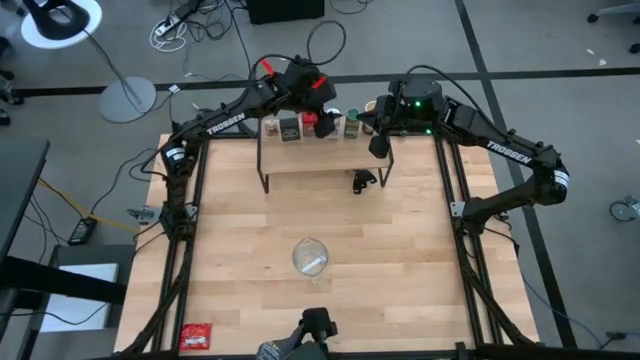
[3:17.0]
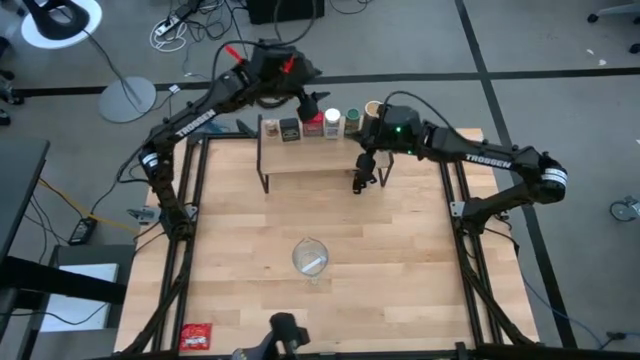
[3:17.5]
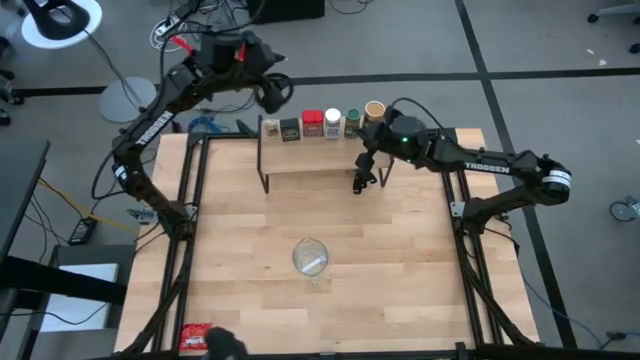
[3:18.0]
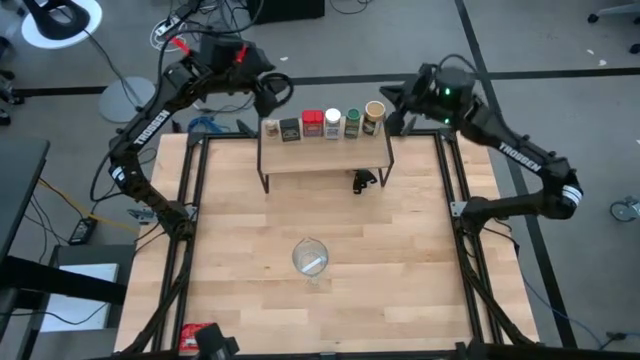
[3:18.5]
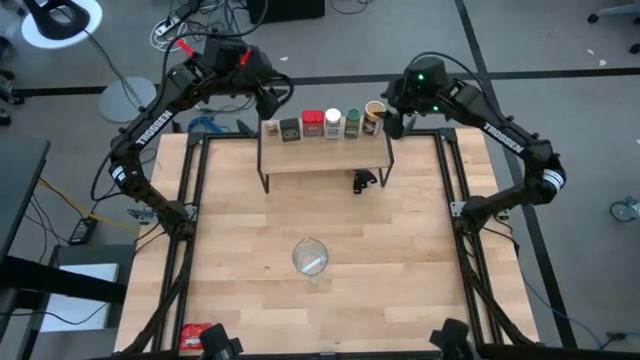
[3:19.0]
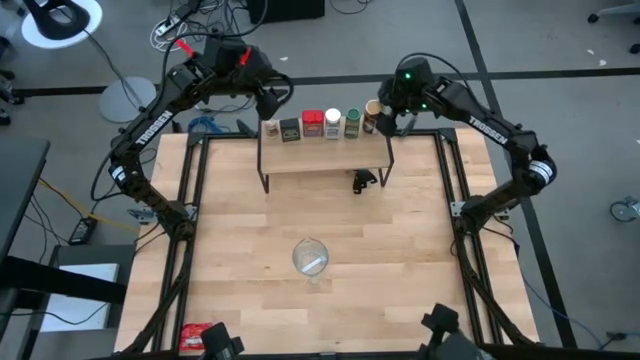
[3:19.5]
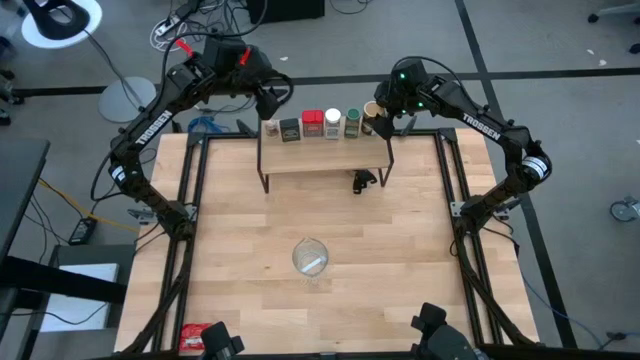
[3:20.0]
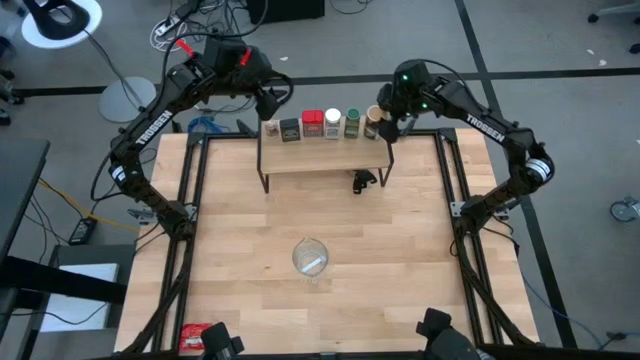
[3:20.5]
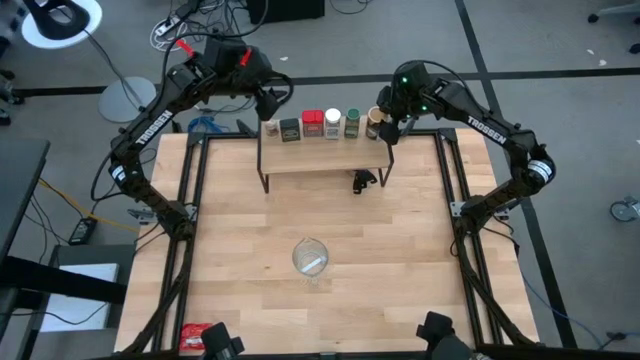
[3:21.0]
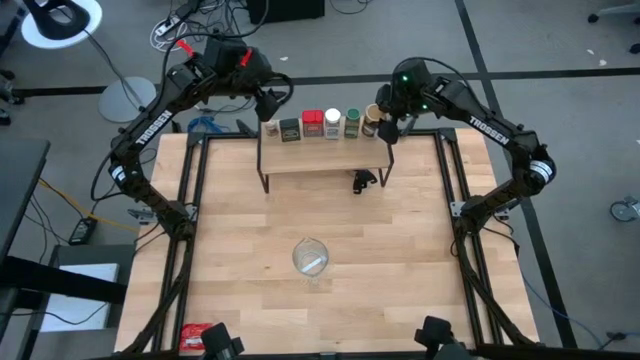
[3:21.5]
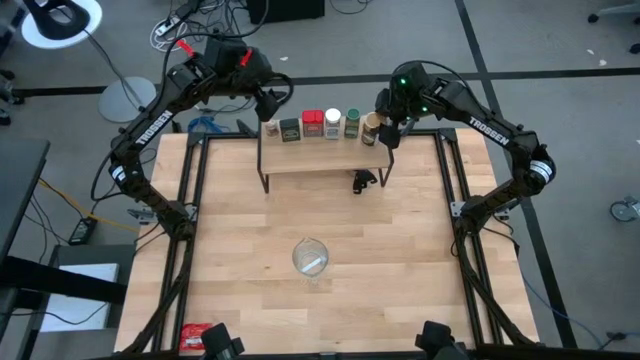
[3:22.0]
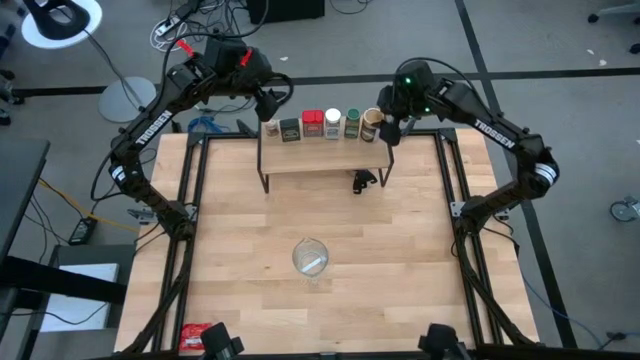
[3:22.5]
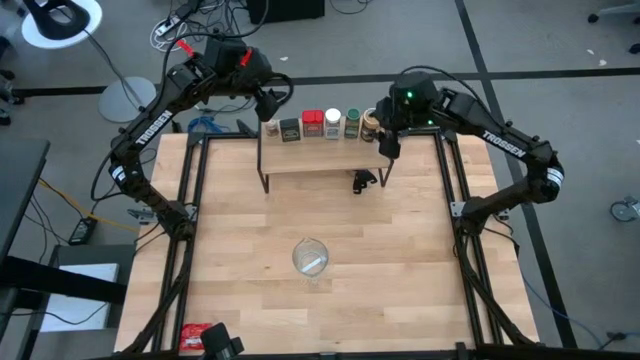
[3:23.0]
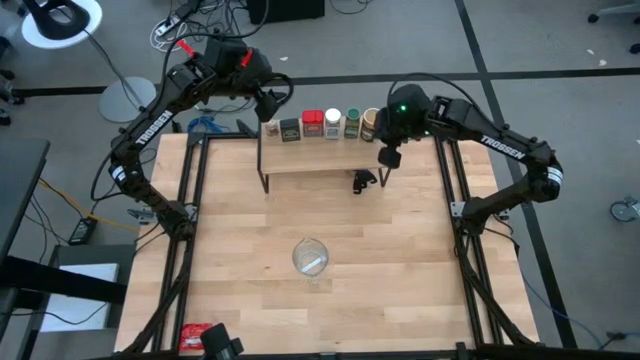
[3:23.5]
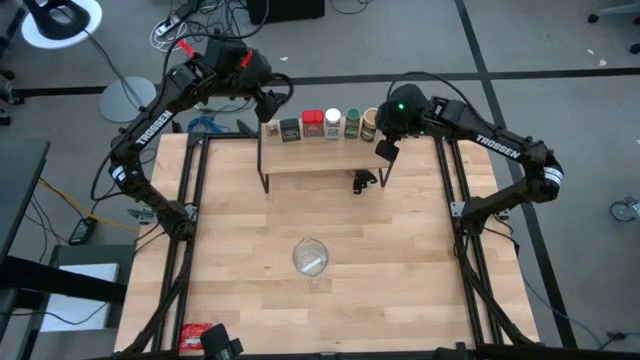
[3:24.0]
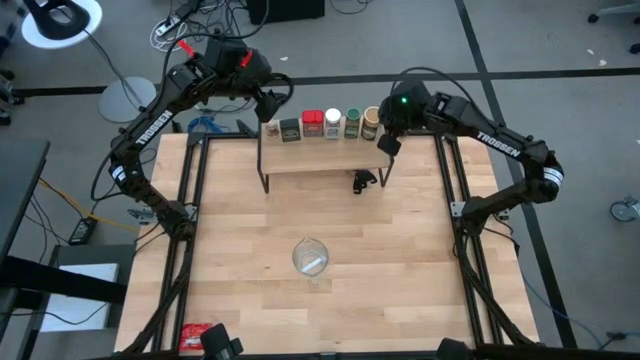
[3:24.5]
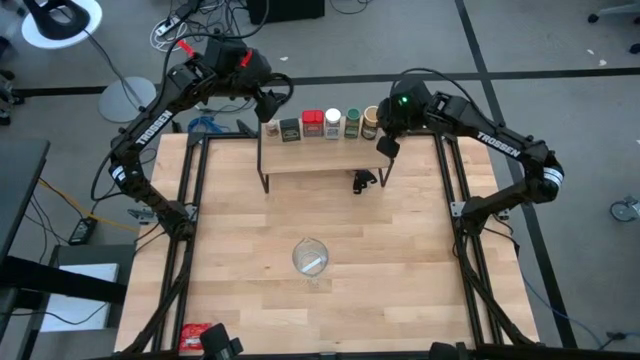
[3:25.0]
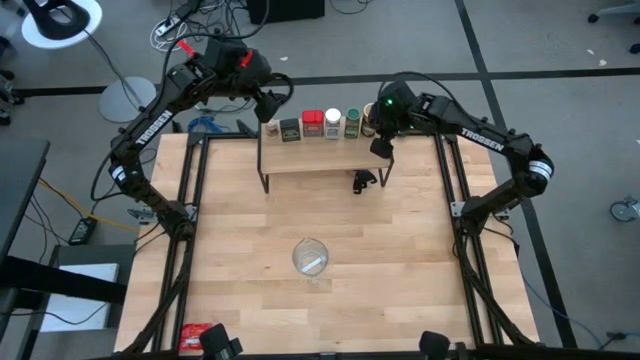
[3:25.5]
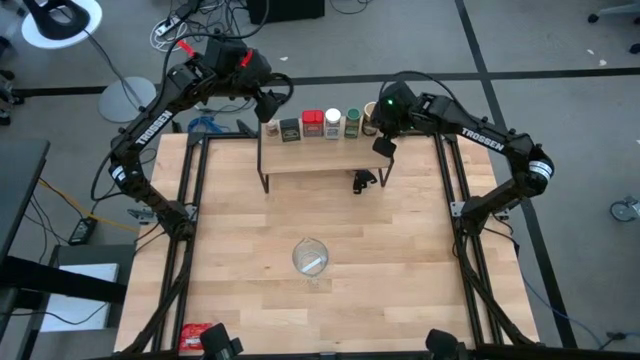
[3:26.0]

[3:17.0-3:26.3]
Task: Shelf spices
Adjust the golden seasoning bottle on the shelf

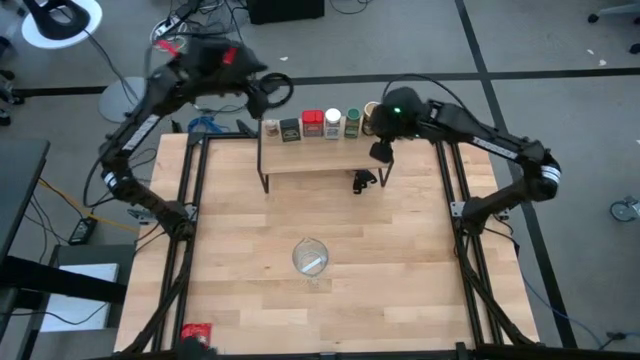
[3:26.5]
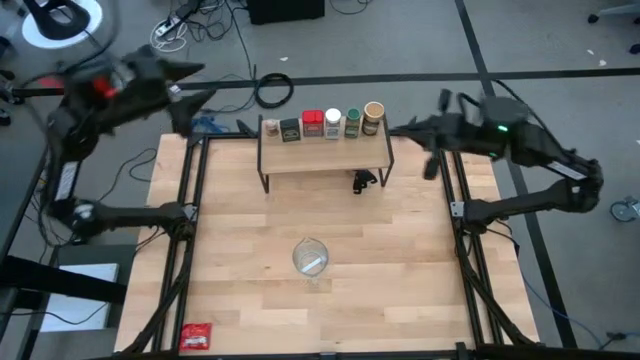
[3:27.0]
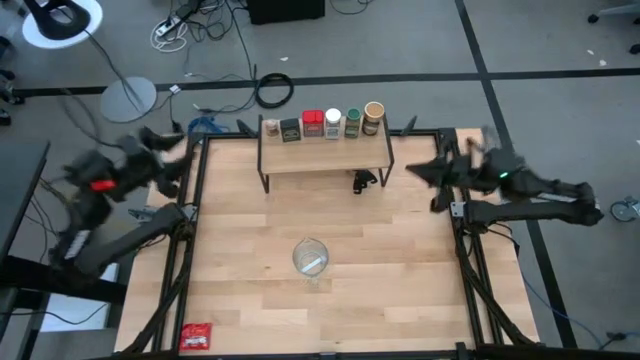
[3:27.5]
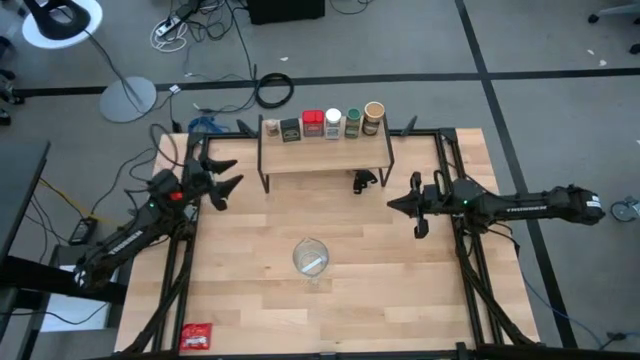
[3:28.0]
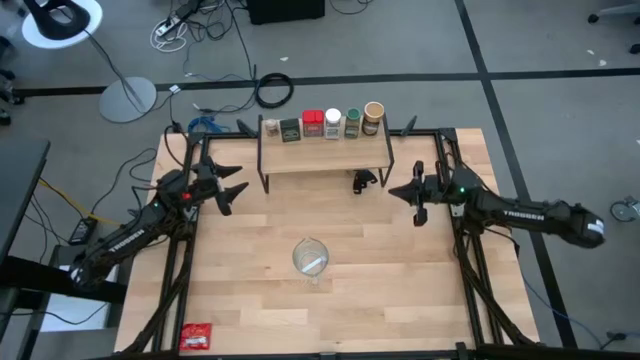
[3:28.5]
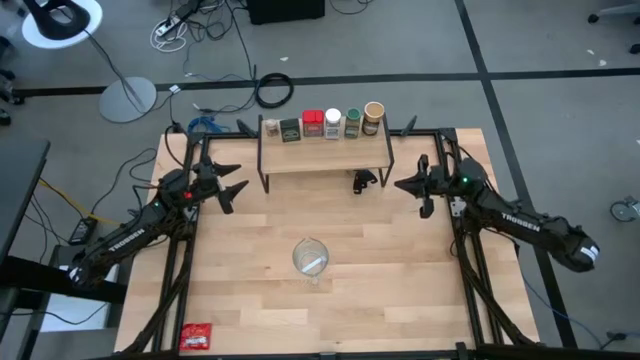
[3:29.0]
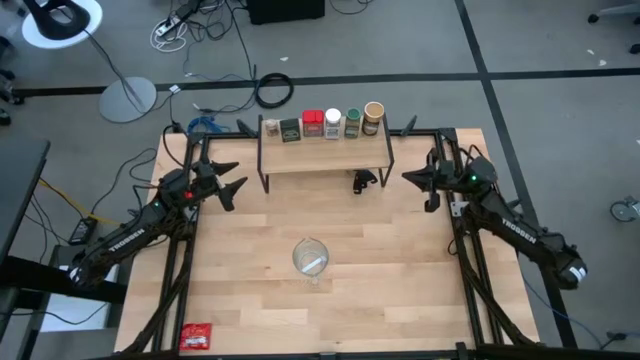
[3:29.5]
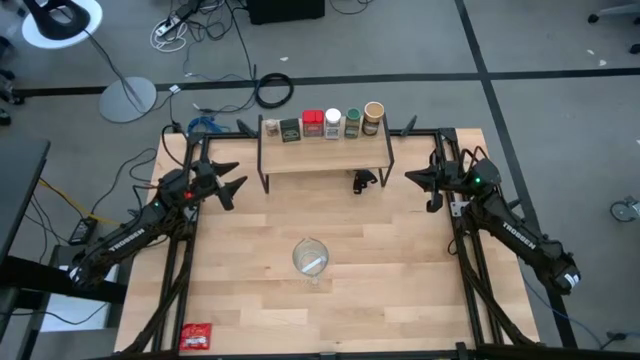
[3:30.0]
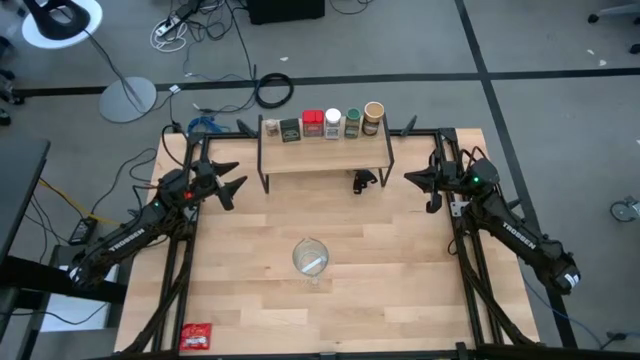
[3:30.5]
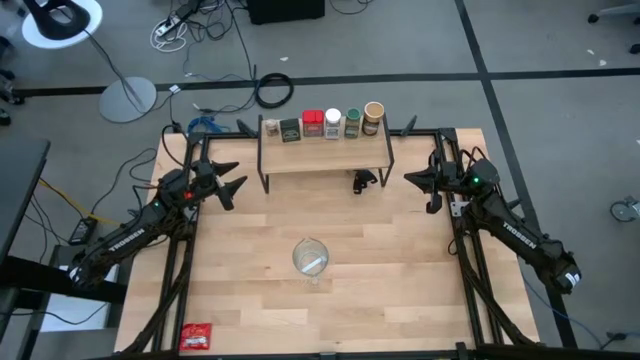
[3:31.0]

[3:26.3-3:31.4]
Return to Home Position
